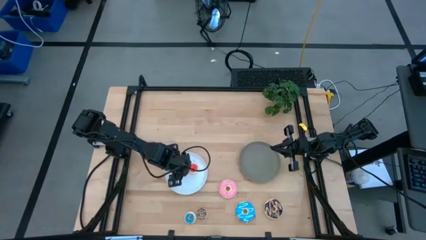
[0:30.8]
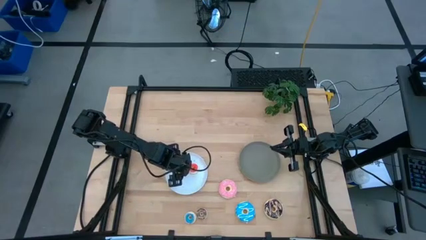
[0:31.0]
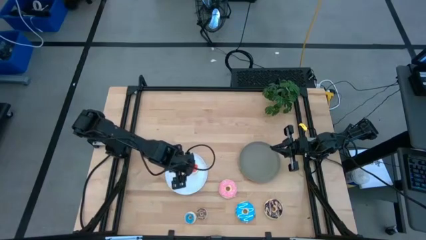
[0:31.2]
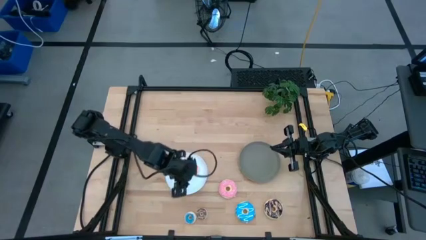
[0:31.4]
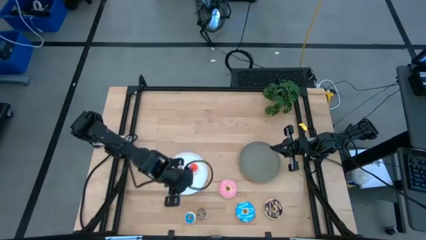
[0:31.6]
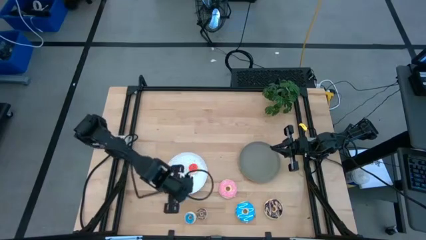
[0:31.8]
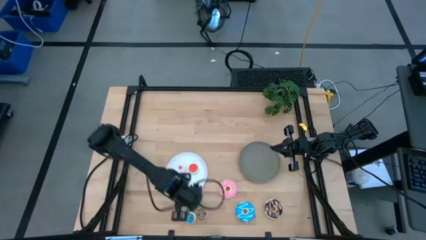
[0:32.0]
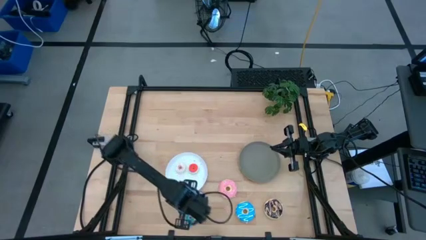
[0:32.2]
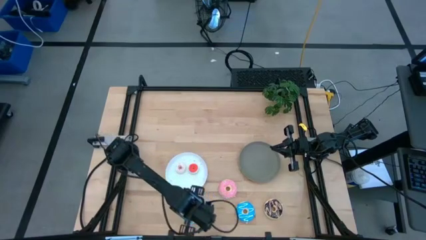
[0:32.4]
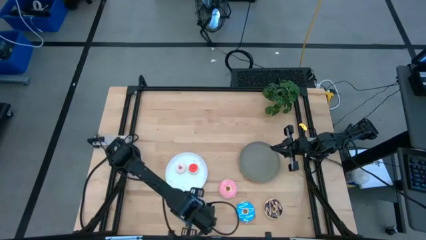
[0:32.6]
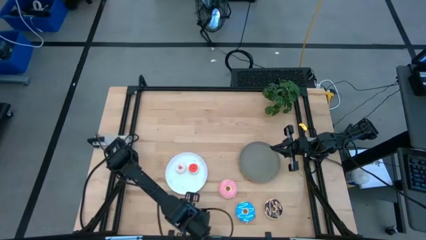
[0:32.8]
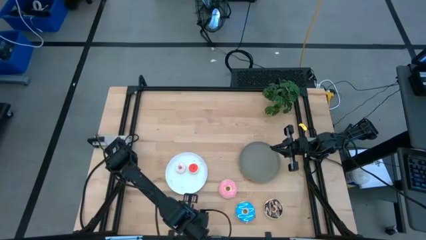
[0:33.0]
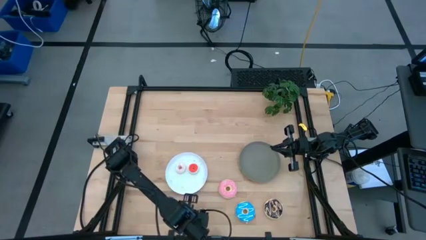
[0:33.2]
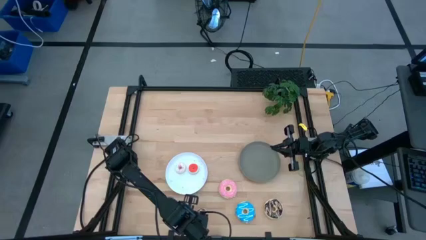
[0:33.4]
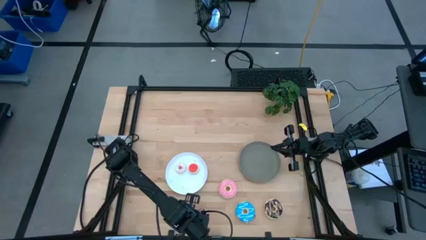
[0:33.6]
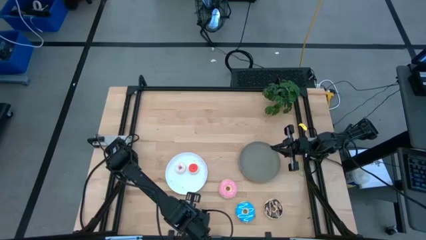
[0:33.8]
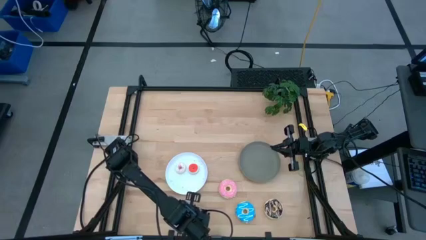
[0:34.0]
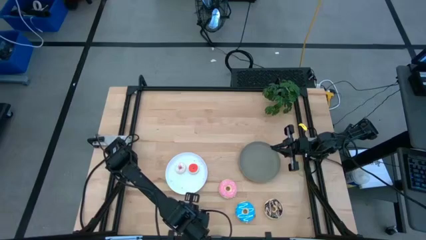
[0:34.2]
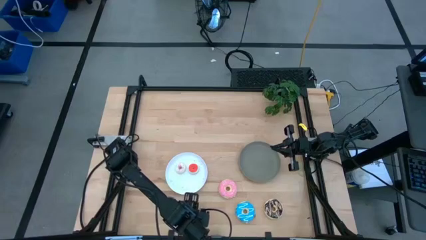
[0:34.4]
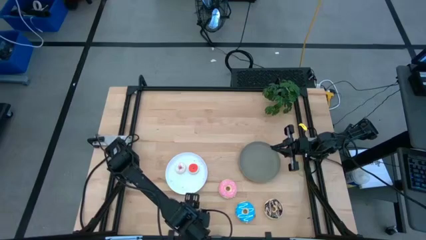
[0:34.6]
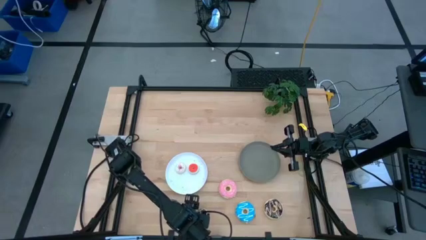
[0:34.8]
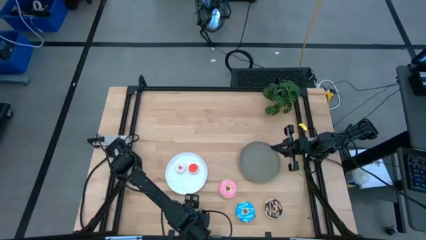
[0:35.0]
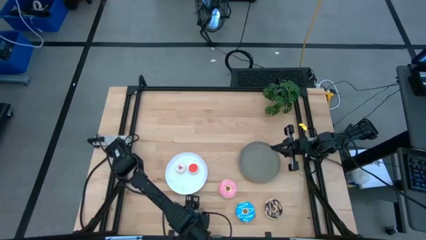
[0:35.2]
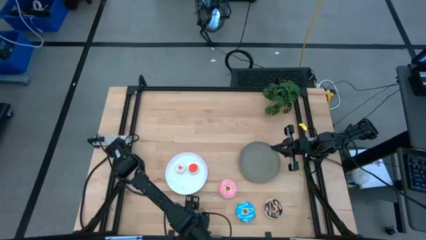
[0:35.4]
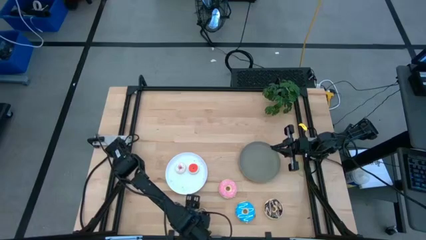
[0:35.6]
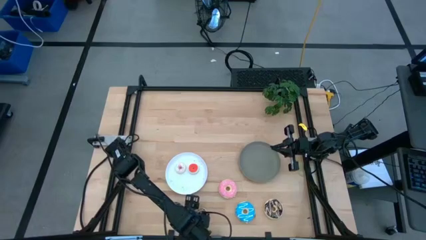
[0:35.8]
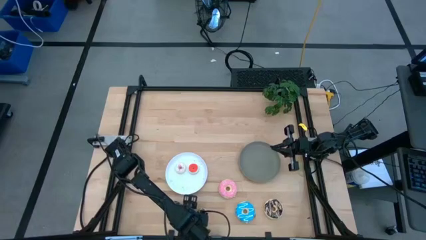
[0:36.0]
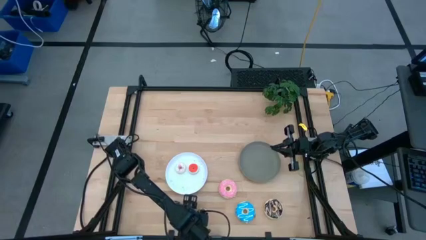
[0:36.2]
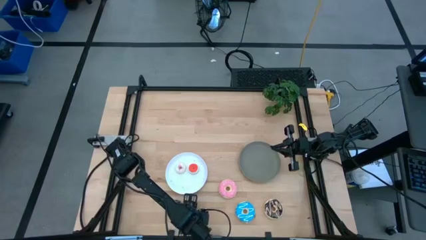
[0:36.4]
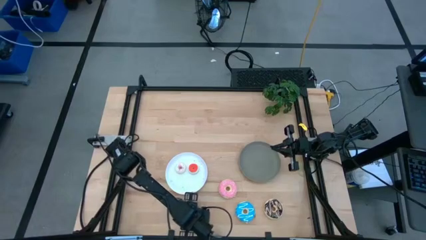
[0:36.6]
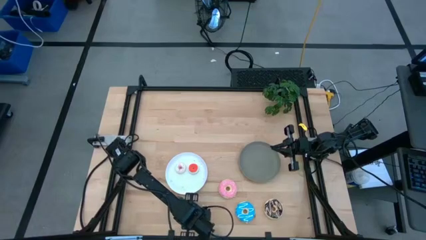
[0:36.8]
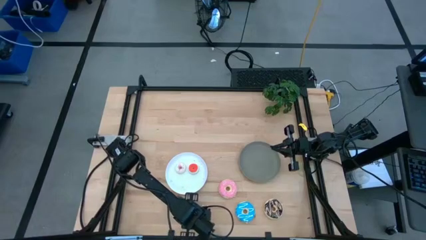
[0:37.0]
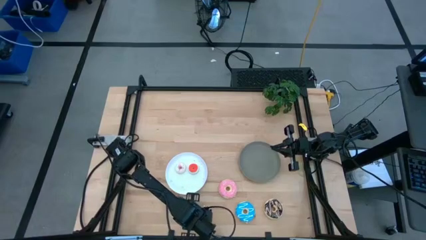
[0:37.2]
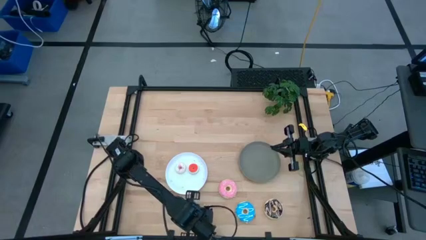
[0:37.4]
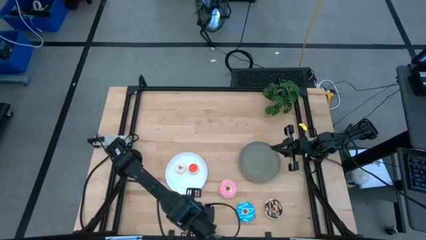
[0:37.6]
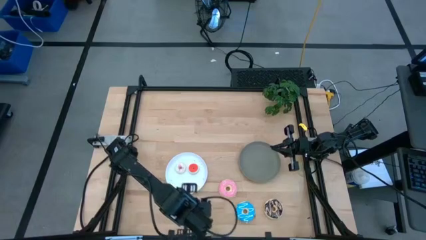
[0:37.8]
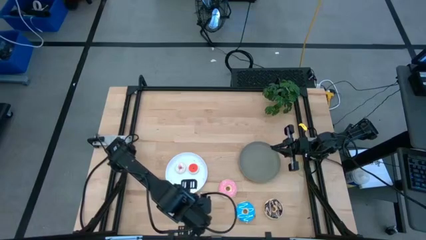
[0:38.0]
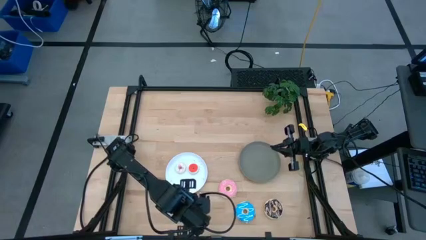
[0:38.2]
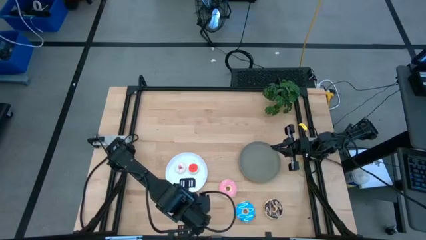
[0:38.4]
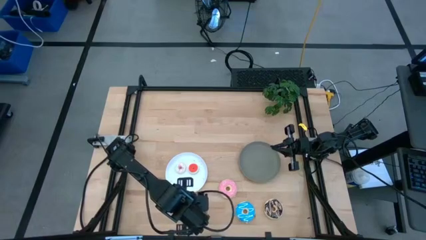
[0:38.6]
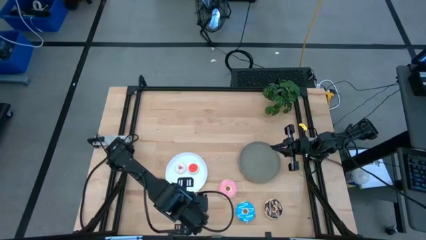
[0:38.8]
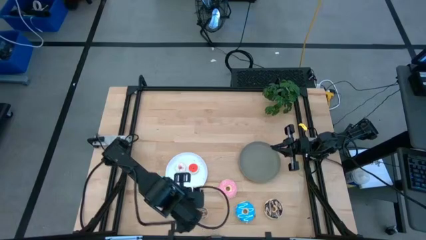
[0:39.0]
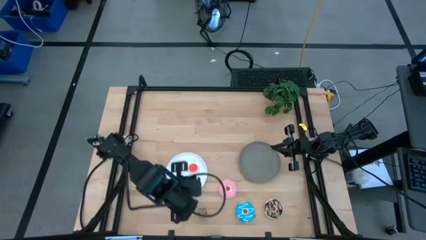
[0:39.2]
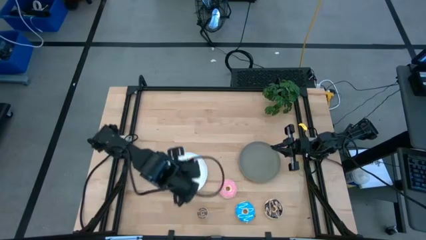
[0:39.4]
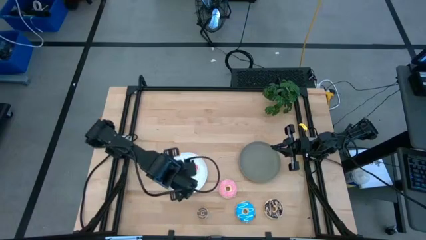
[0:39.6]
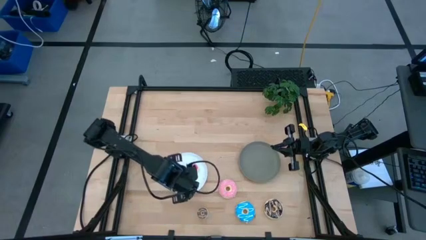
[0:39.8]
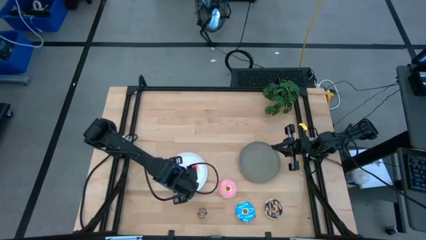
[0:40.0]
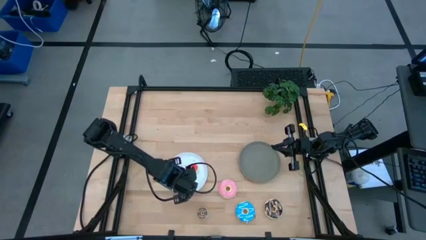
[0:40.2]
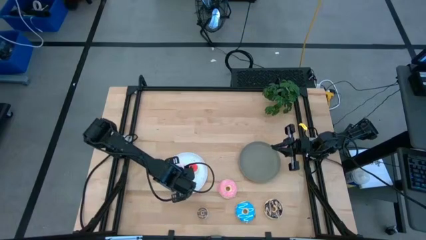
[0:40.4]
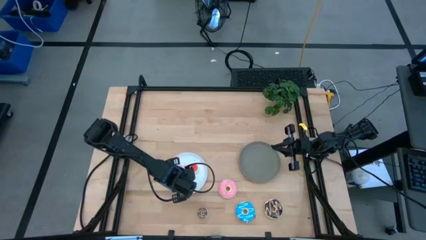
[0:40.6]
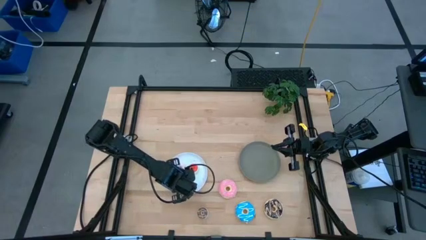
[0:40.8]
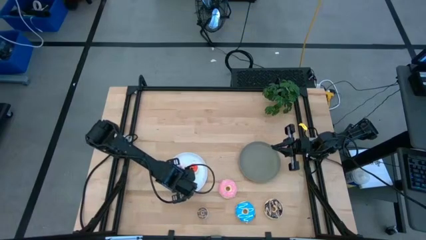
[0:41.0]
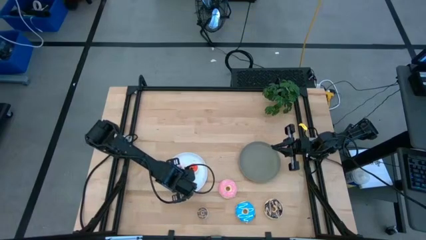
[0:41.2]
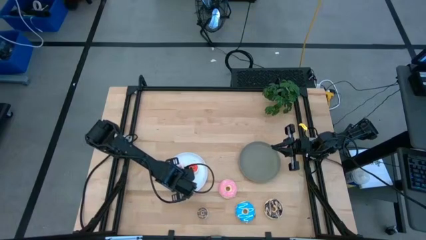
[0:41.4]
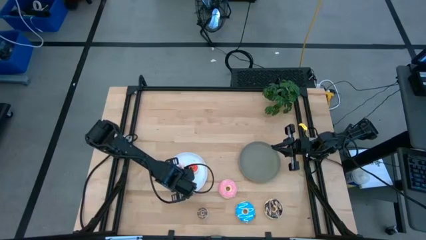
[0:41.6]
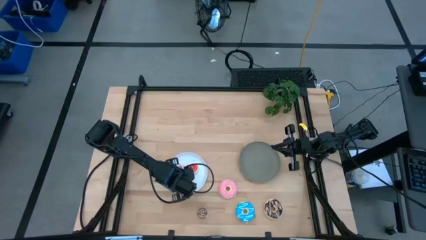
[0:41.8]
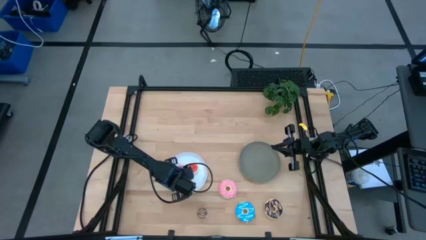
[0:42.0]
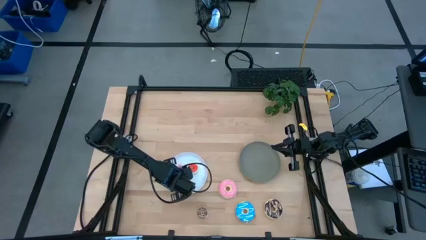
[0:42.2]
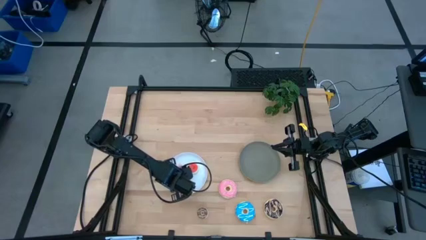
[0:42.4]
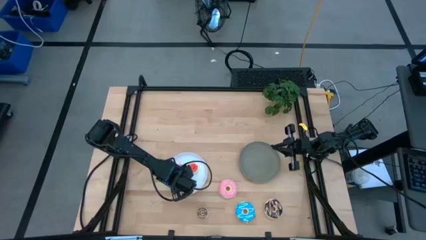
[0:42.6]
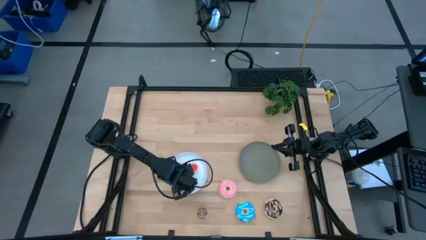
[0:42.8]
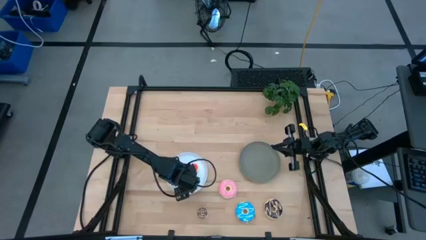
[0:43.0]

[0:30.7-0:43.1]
Task: Pick & Place donuts
Put the small light blue donut on the white plate

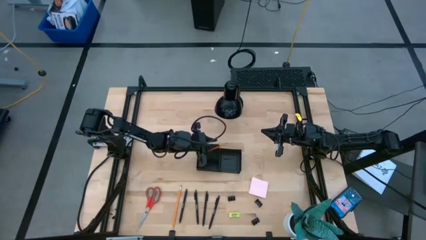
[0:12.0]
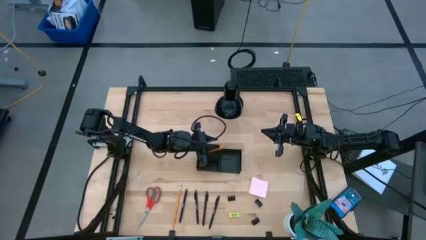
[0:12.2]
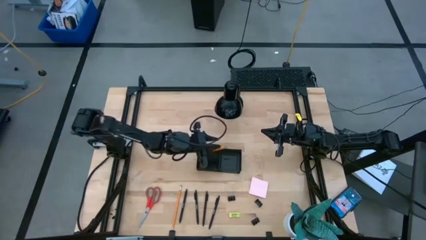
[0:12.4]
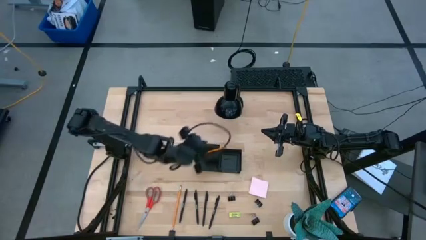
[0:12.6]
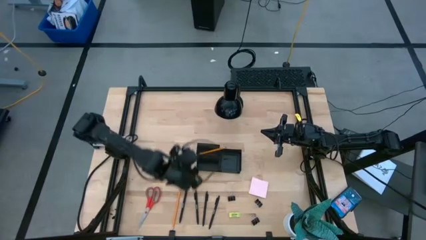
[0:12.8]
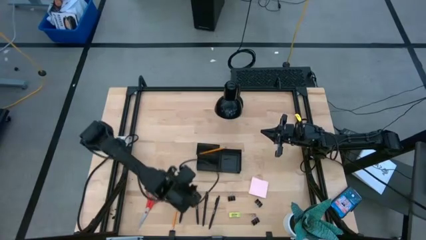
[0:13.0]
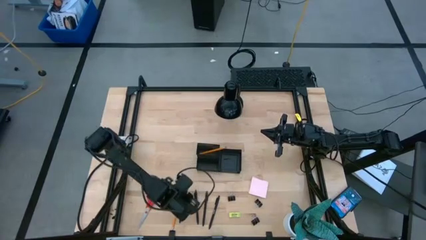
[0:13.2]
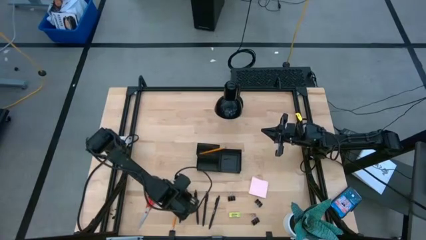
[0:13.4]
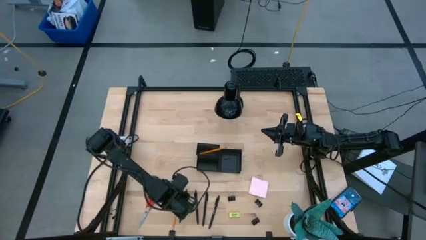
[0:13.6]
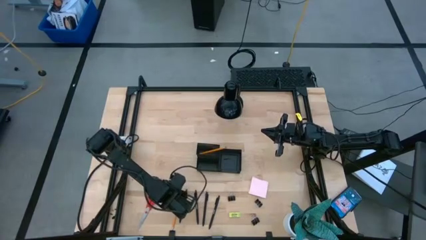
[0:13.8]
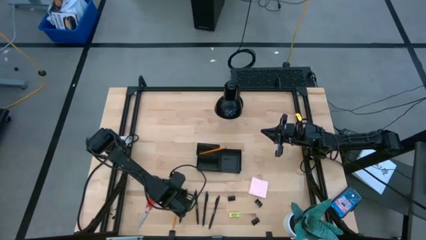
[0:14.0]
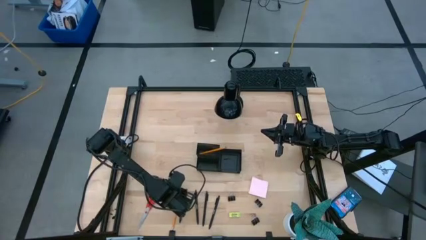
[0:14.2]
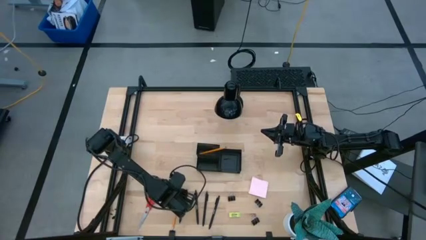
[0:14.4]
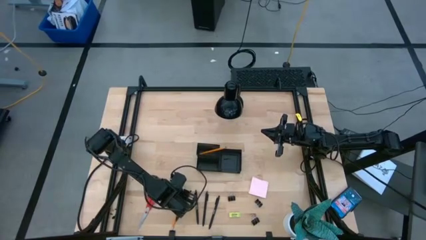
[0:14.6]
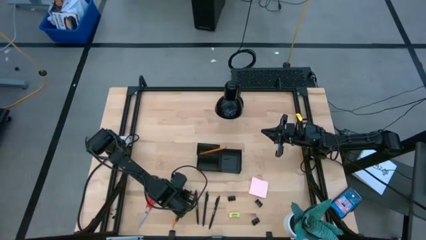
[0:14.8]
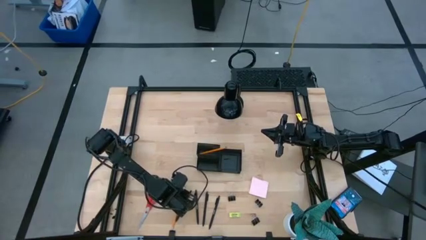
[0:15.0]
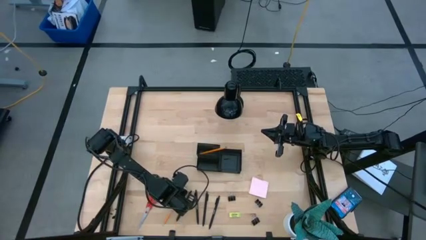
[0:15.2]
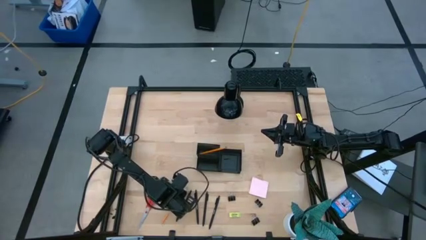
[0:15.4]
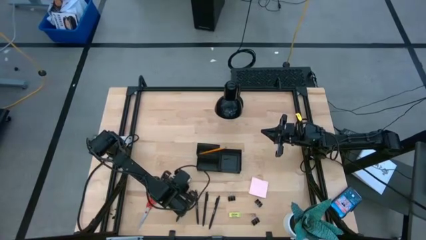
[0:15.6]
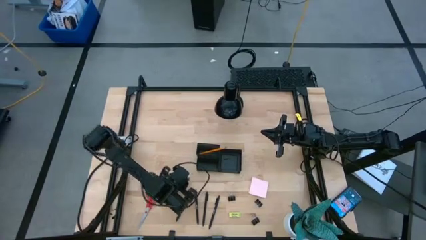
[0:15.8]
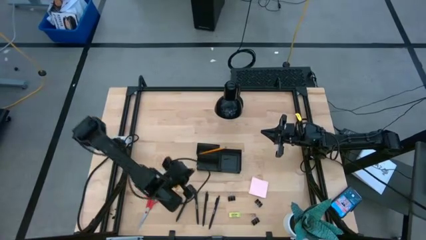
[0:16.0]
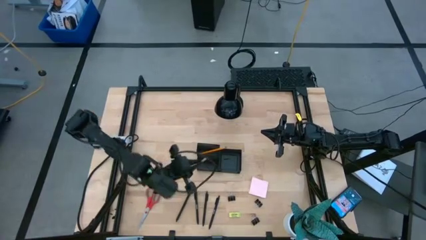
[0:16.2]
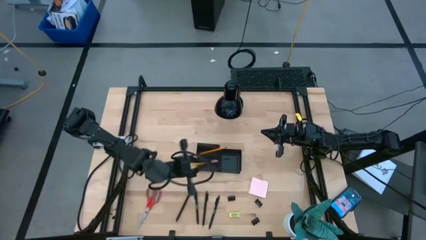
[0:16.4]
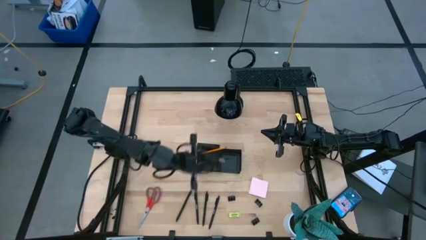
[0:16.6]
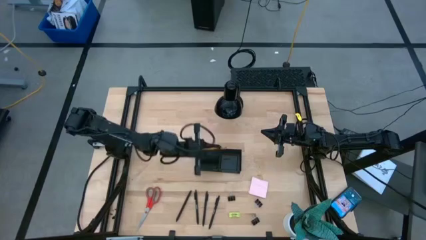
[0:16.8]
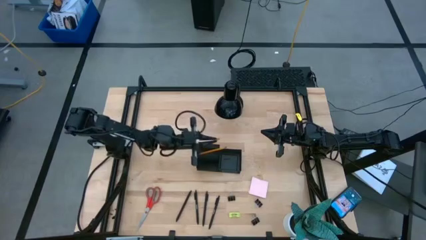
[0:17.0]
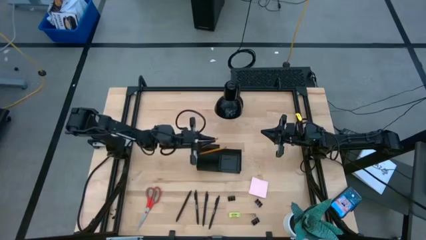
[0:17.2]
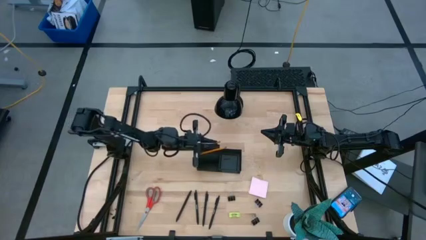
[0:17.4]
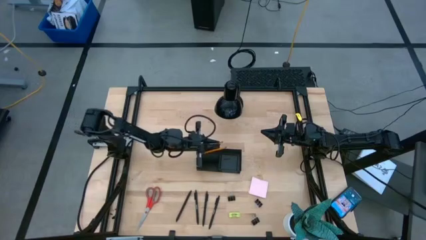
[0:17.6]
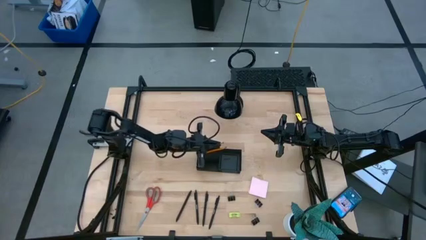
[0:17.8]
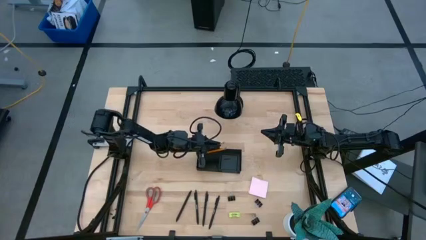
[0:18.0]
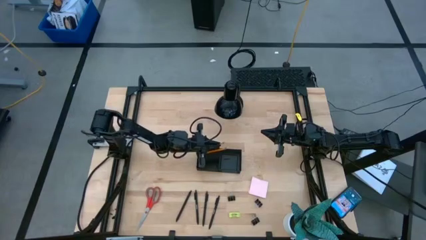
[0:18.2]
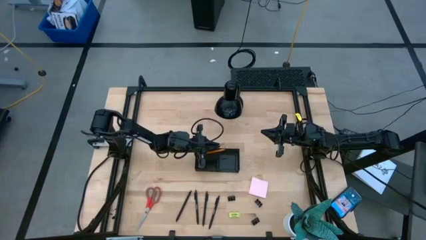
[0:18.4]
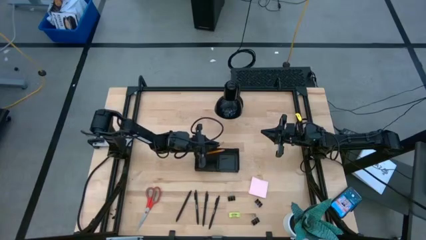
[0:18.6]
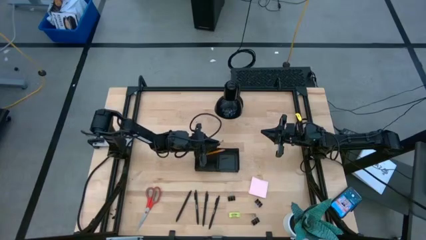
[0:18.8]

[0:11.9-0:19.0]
Task: Pick and place office supplies into organizer
Put the orange pencil into the black desk organizer
